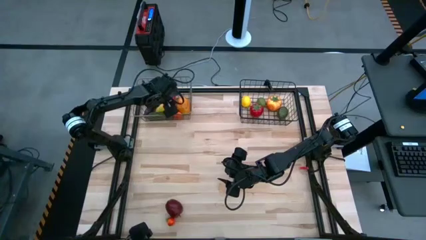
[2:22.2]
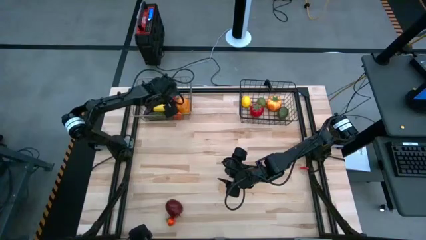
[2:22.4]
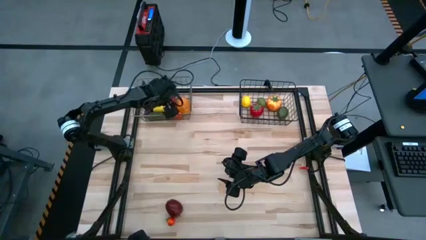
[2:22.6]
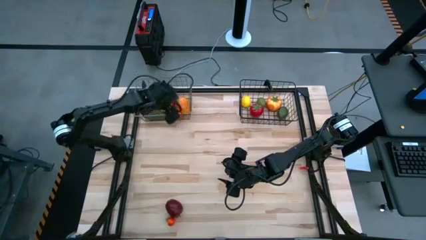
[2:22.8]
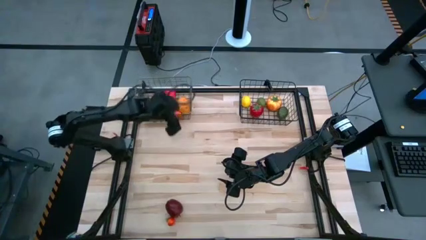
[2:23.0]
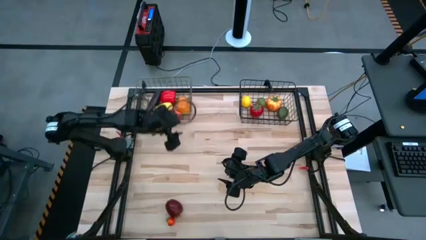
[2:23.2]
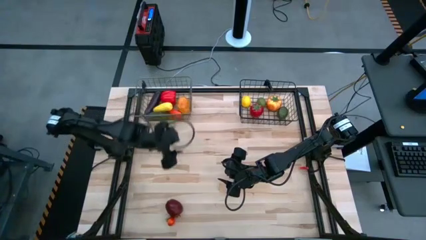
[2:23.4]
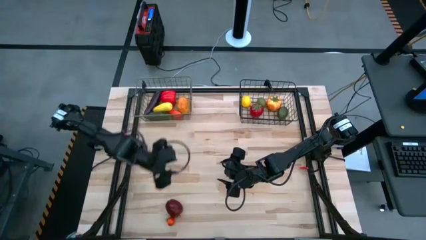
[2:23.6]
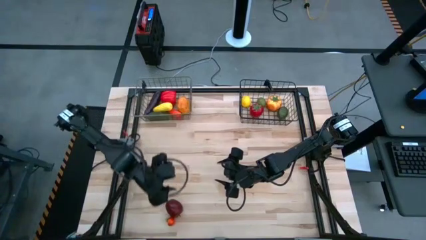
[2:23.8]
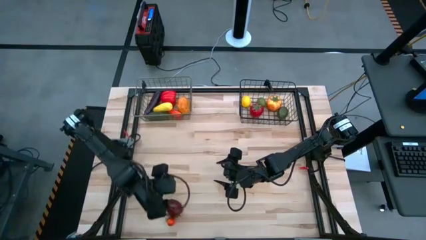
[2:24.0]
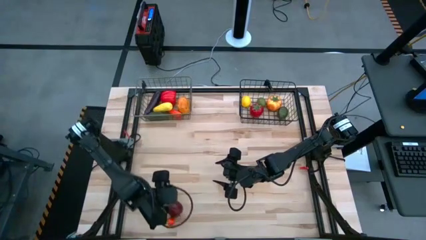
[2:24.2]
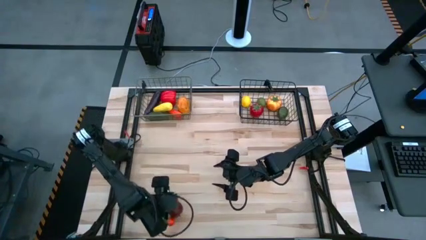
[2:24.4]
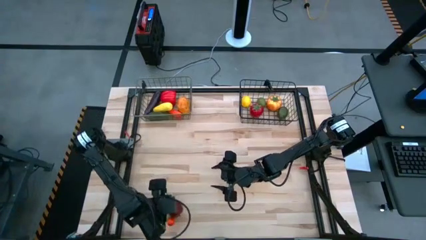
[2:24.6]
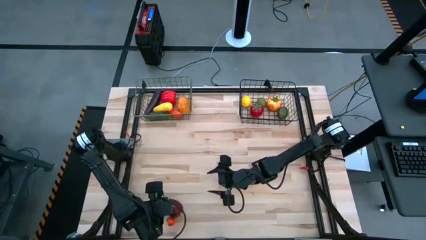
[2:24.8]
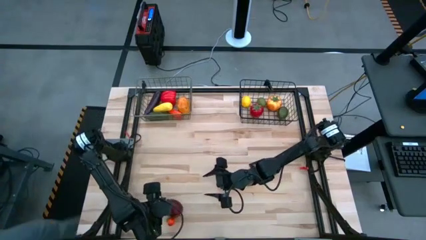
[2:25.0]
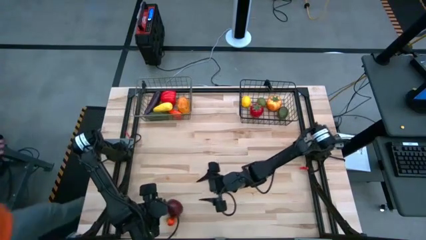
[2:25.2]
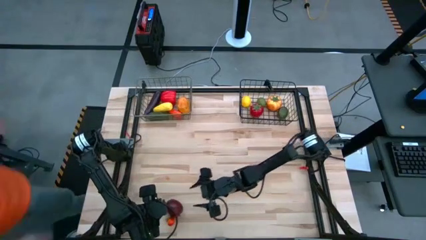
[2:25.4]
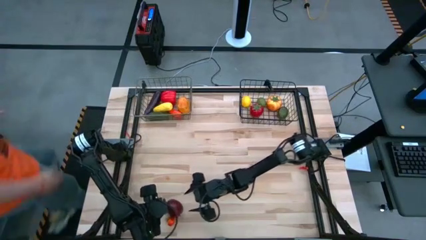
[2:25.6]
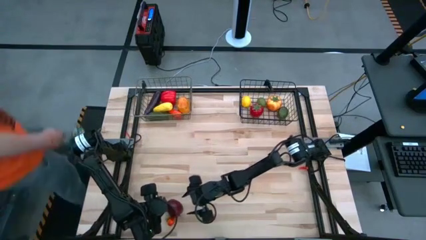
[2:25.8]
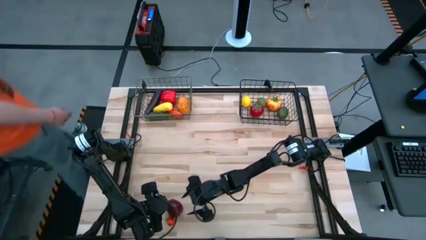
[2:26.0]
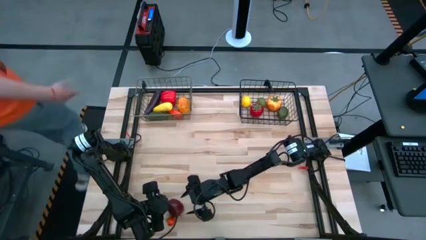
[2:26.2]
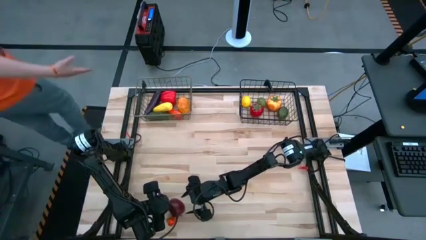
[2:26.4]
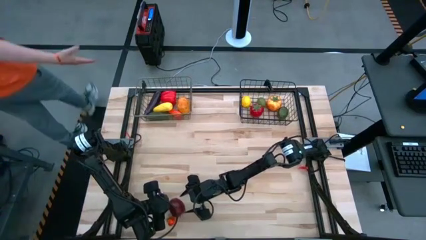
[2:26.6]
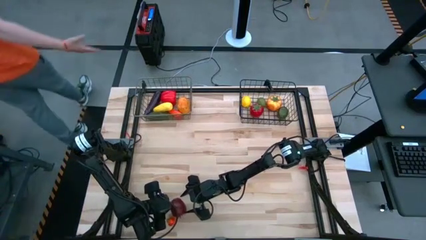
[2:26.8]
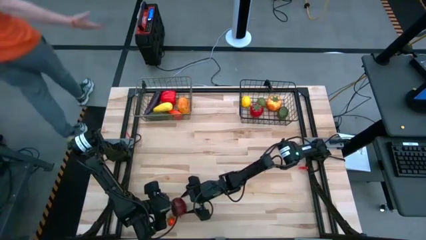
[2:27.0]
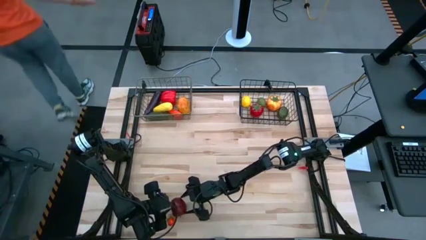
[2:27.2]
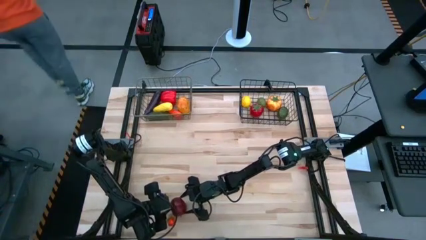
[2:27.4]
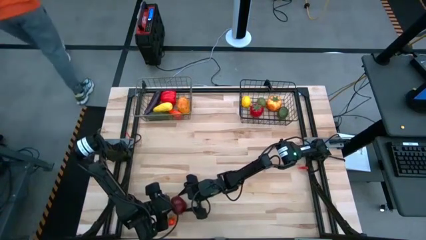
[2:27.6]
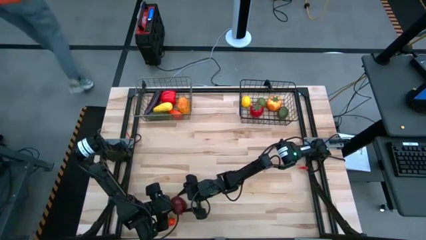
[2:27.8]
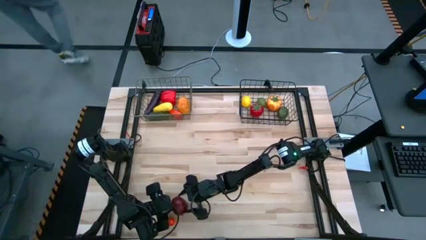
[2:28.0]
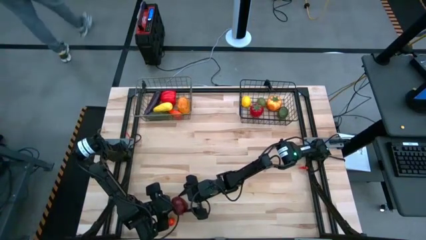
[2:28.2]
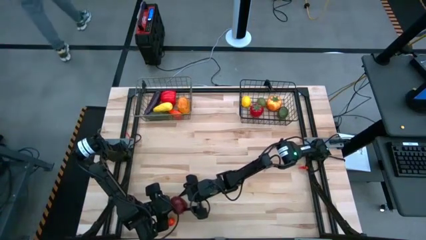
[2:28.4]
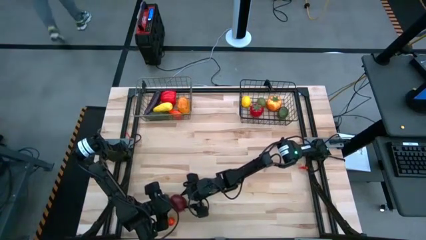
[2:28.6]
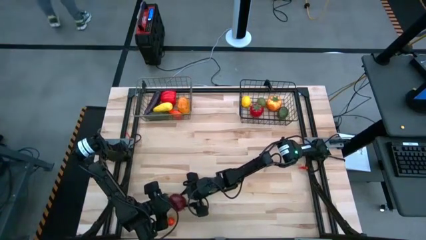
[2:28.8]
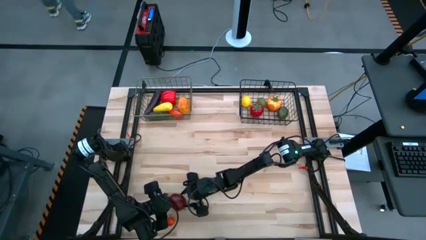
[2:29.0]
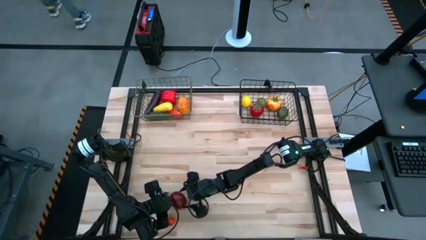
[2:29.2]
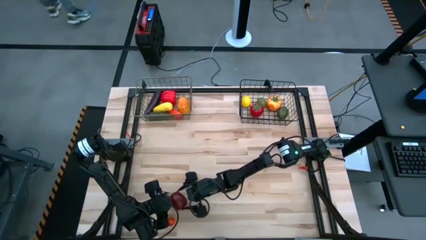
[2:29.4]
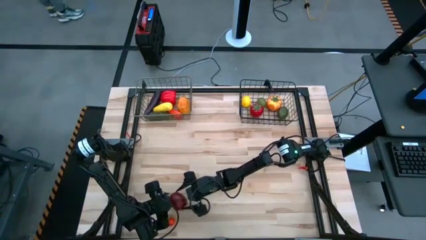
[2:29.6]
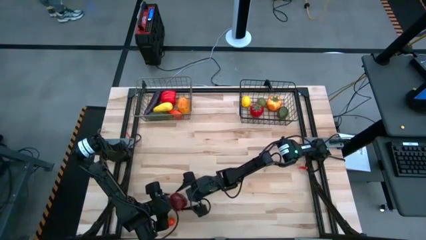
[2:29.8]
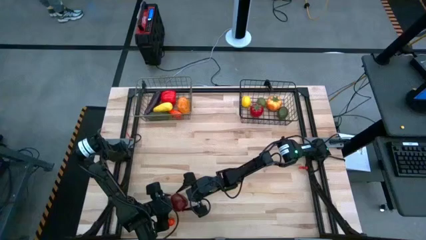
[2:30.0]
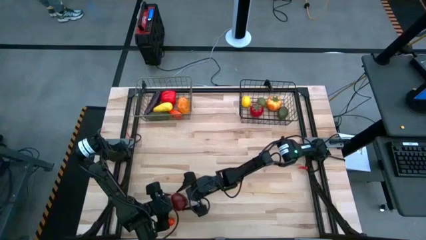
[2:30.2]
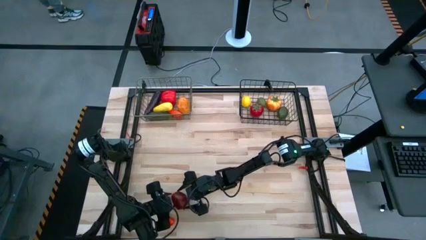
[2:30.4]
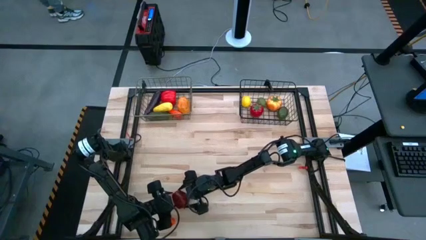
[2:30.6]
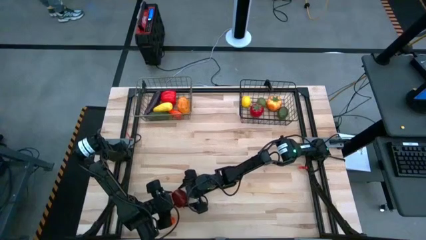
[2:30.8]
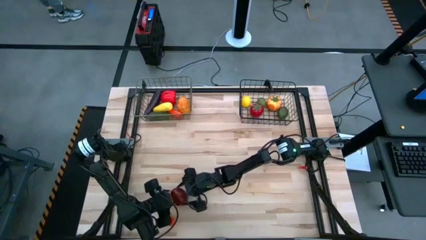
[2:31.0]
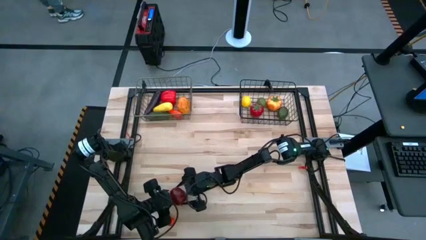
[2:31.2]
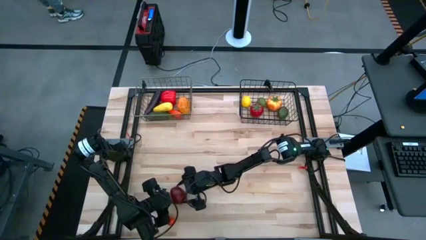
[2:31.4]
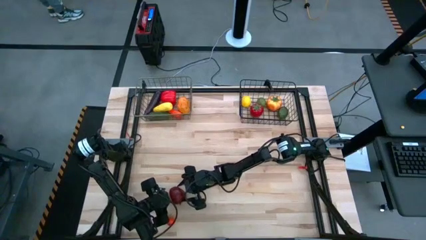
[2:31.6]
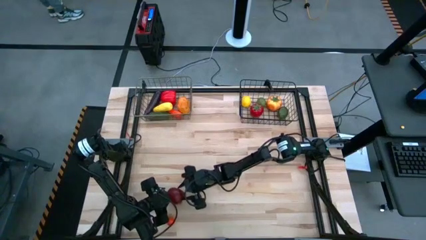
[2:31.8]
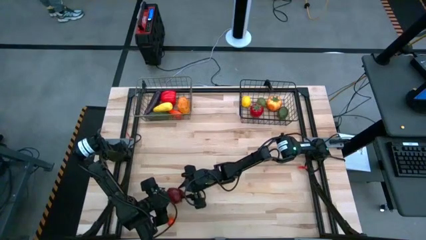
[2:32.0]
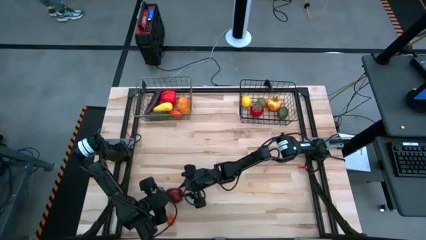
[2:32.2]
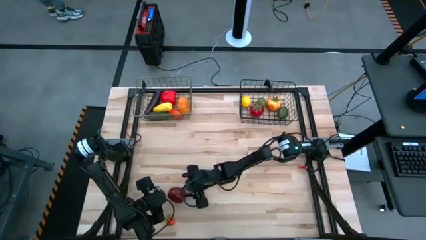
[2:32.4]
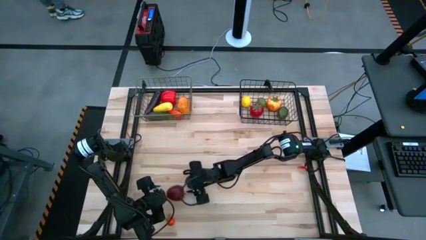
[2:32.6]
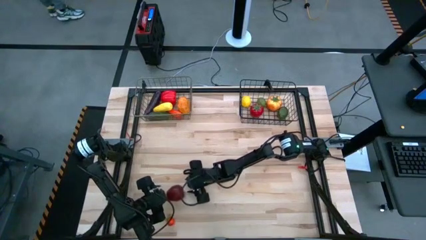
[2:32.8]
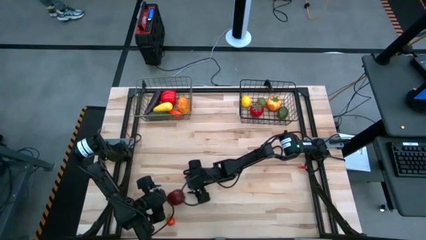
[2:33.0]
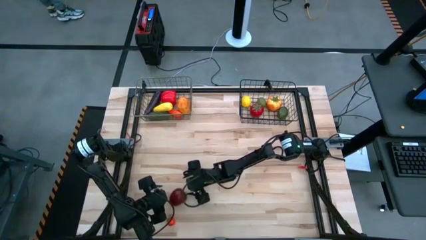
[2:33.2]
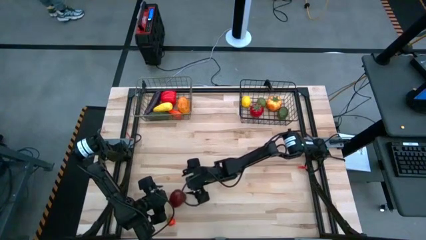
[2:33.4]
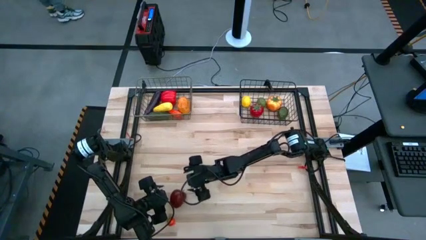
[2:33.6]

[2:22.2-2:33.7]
Task: Sort produce into baskets
Put the apple into the black wire basket

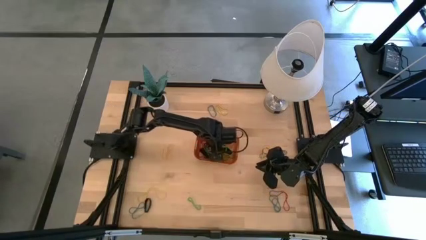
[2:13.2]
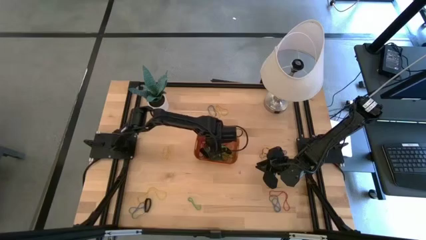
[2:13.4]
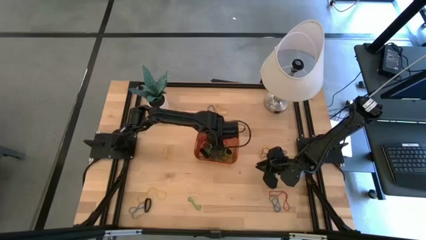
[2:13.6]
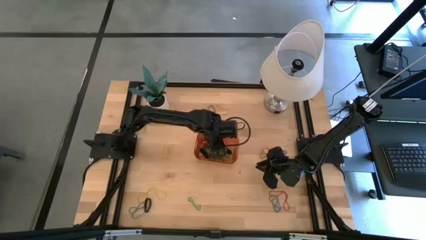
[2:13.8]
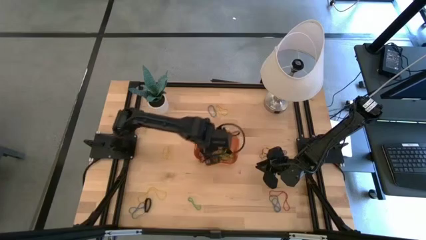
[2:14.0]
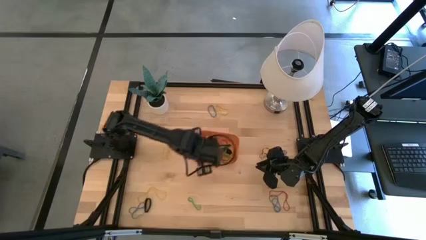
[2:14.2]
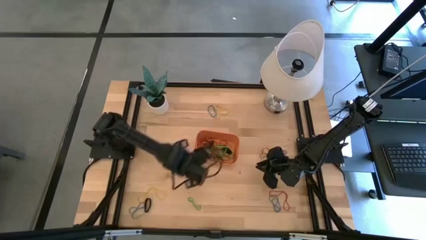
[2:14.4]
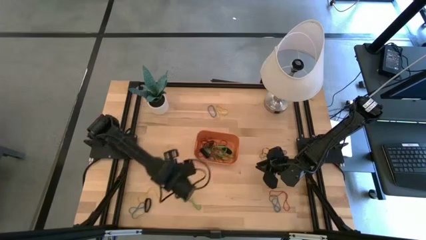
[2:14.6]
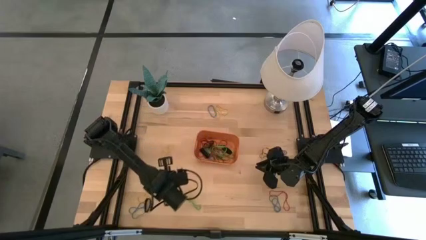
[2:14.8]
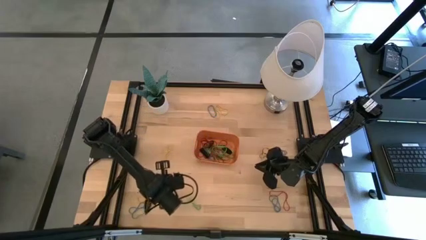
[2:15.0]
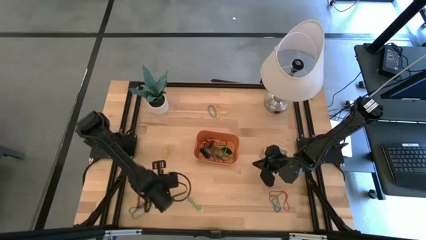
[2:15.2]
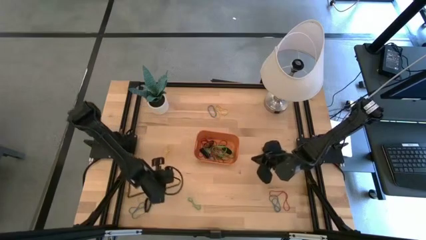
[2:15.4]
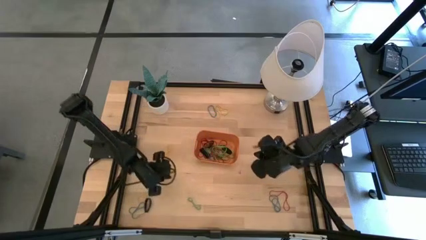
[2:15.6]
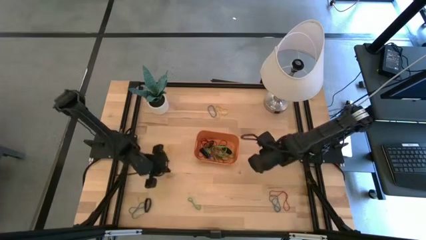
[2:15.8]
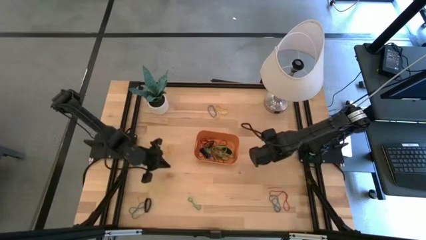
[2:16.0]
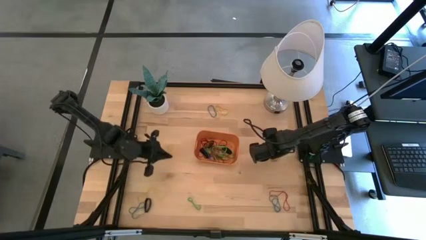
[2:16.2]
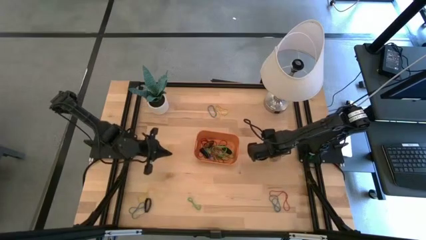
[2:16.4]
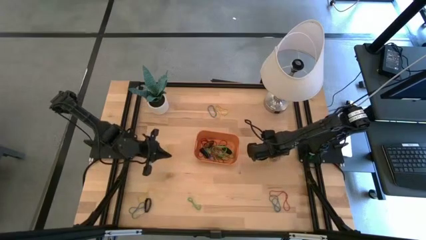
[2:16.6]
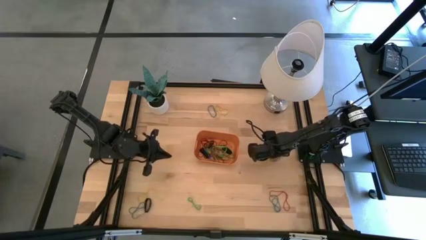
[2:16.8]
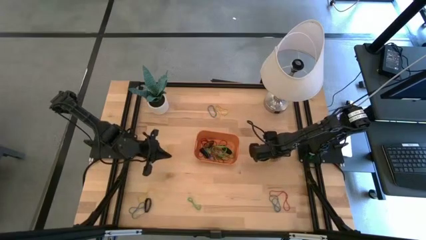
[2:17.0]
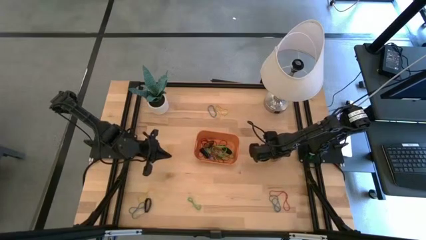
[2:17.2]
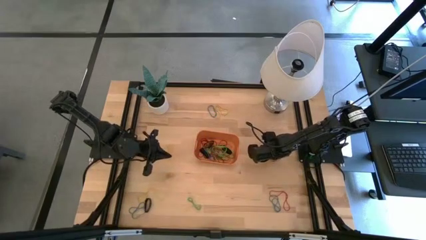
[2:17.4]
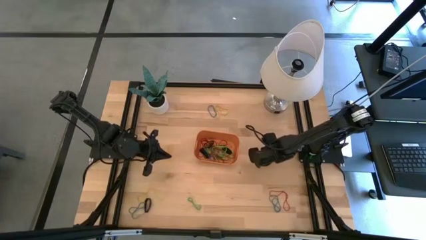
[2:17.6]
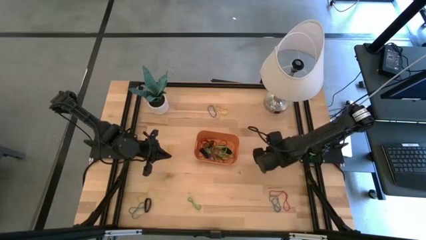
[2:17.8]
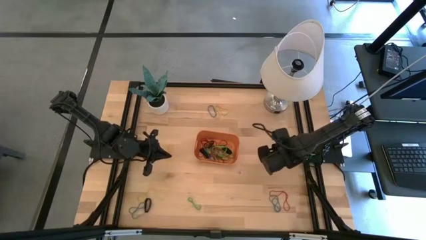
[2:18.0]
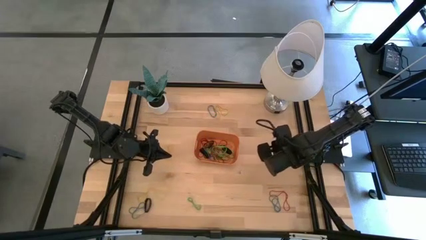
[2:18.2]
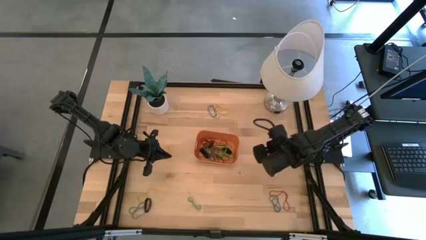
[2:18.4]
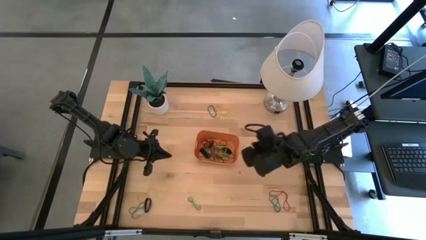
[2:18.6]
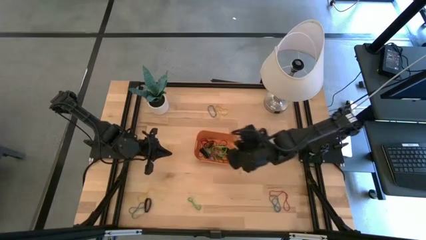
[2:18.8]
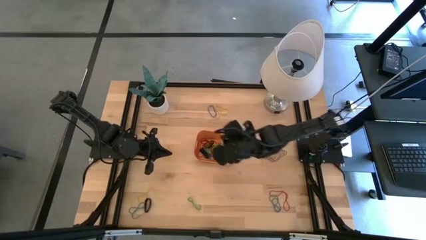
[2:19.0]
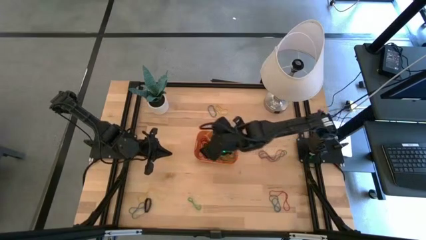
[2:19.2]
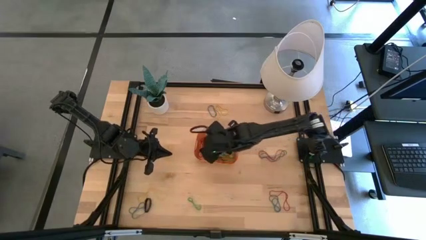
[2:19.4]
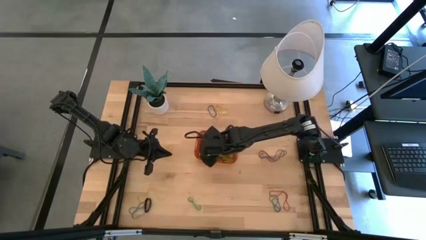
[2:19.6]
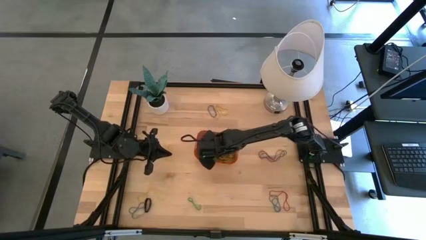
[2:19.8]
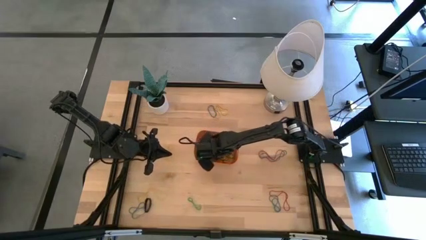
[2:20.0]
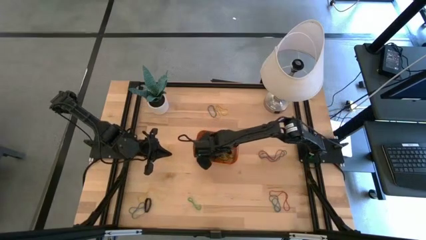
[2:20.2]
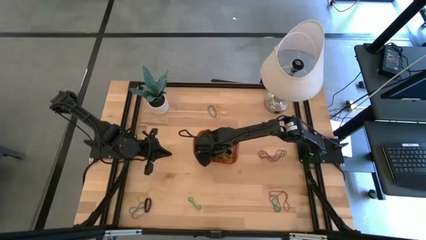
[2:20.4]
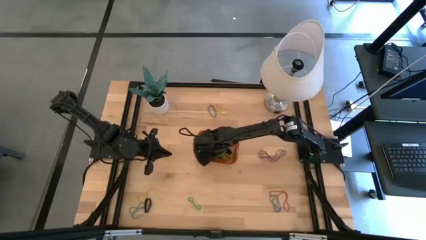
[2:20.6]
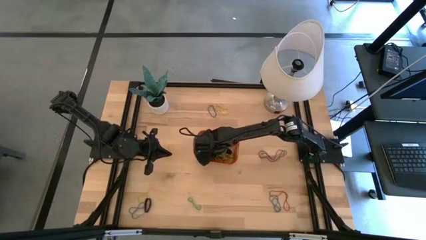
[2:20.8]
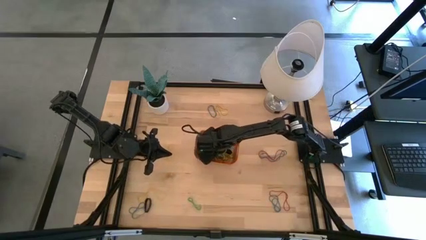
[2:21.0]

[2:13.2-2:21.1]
Task: Pick and place rubber bands into bin
Put the yellow rubber band into the orange bin
